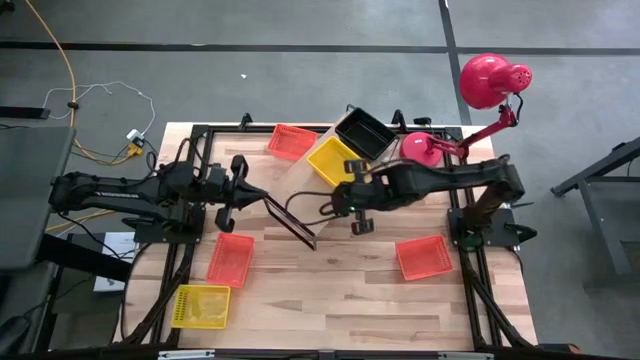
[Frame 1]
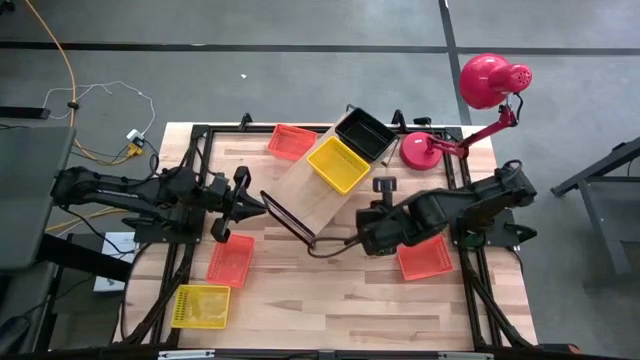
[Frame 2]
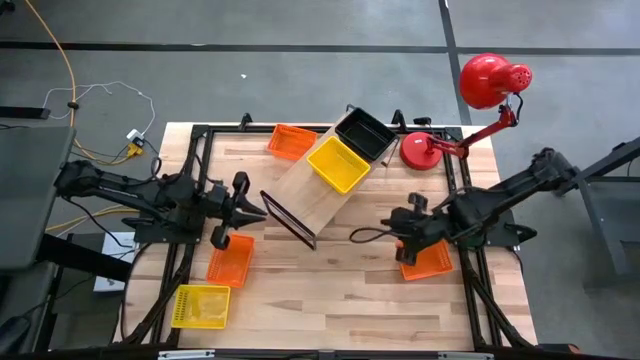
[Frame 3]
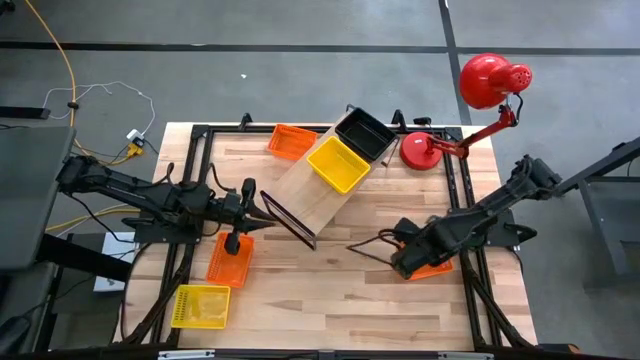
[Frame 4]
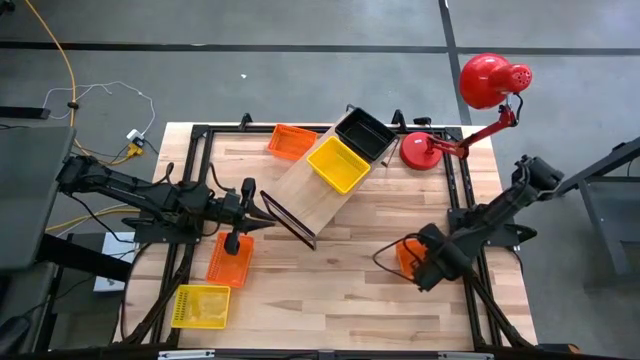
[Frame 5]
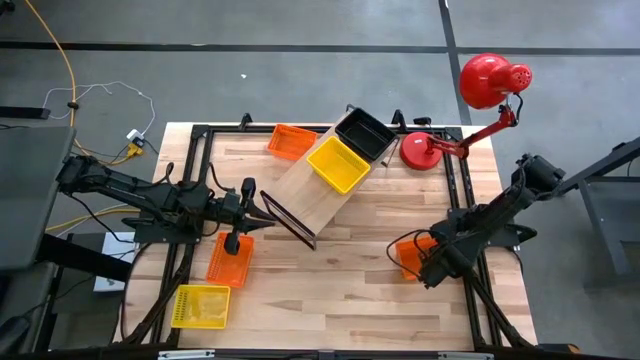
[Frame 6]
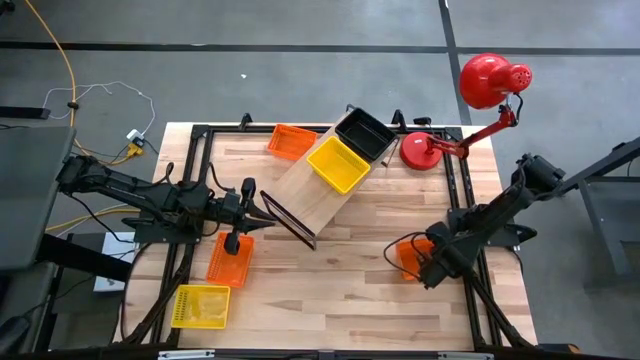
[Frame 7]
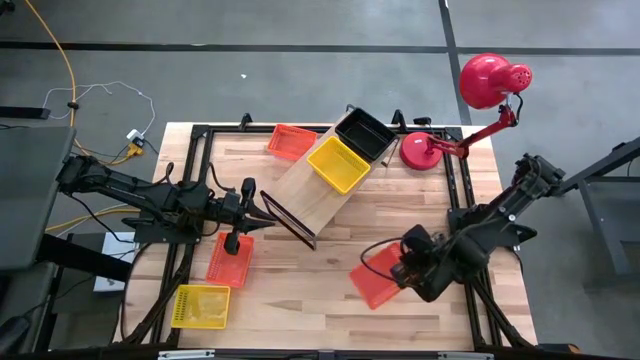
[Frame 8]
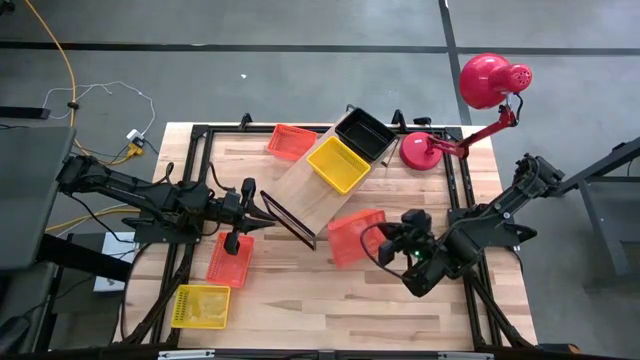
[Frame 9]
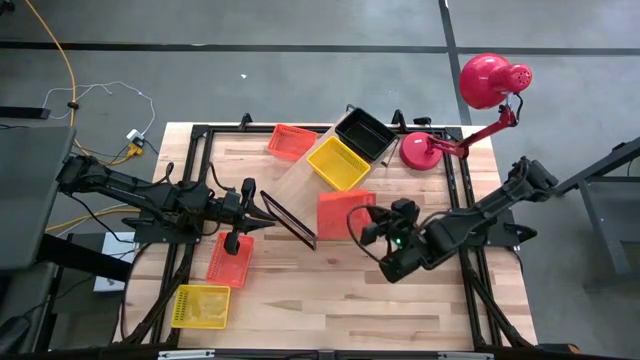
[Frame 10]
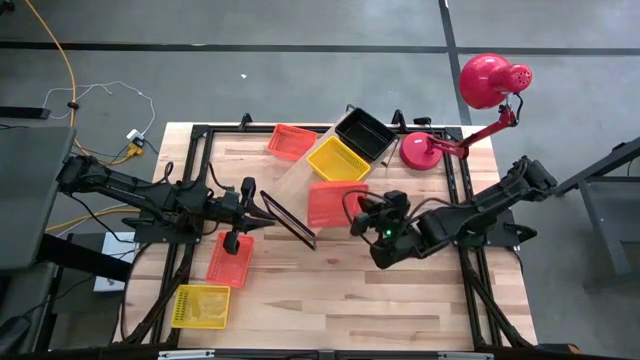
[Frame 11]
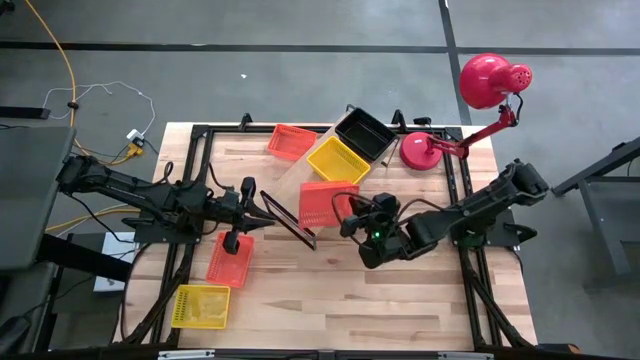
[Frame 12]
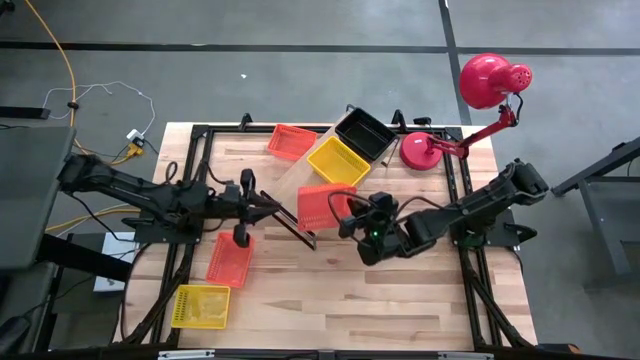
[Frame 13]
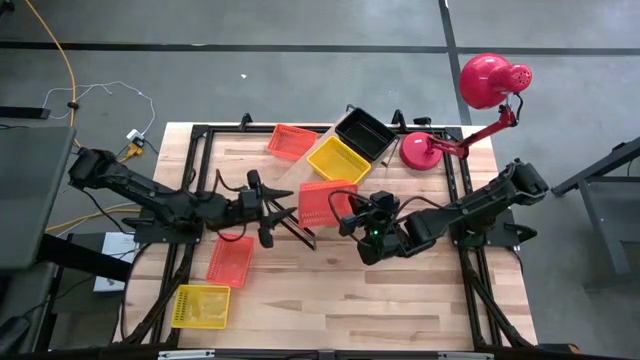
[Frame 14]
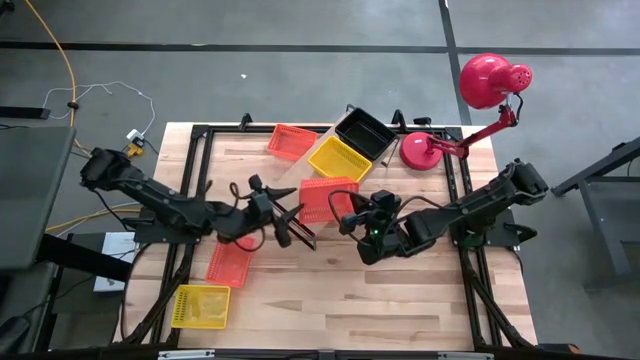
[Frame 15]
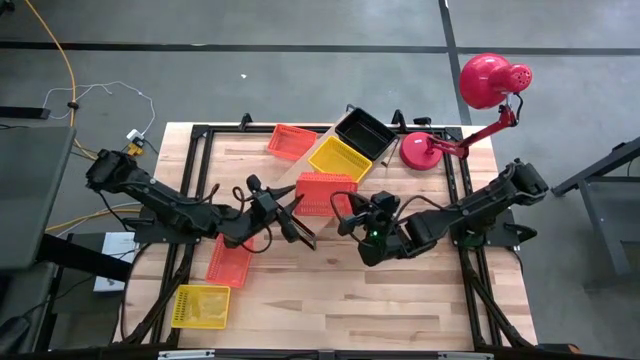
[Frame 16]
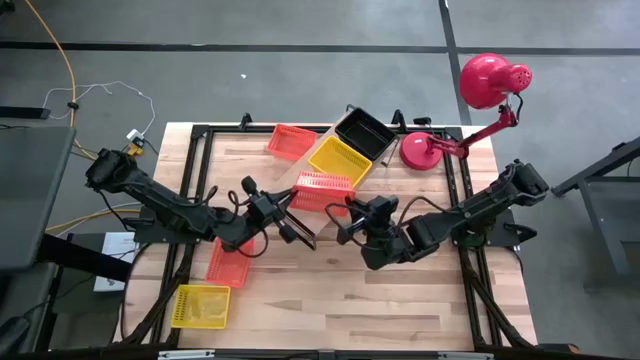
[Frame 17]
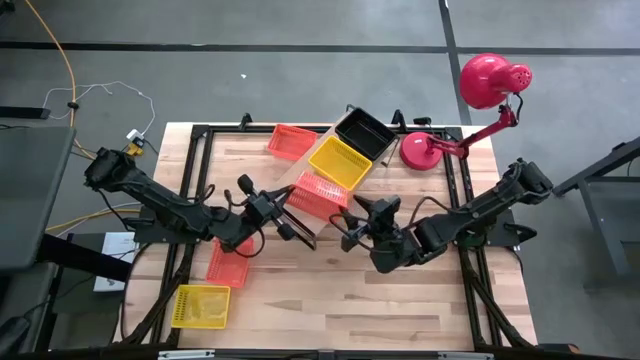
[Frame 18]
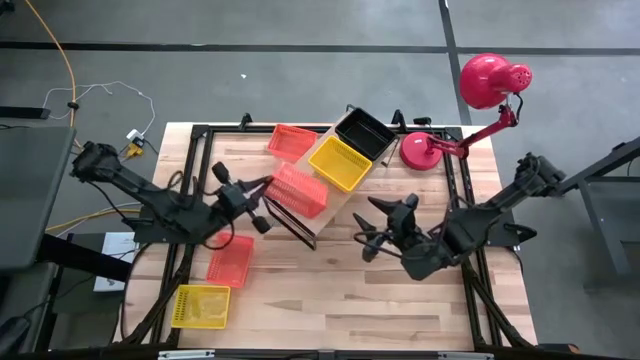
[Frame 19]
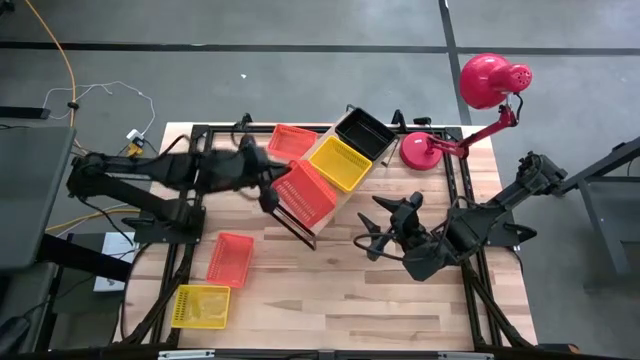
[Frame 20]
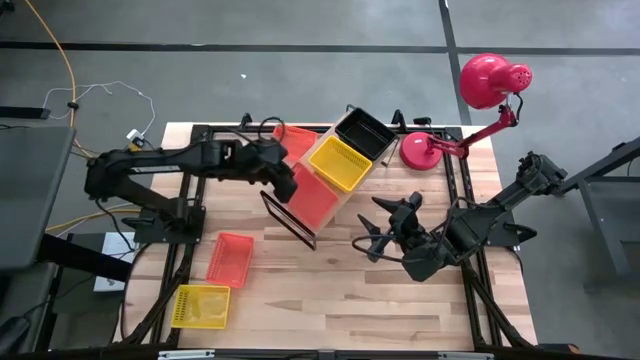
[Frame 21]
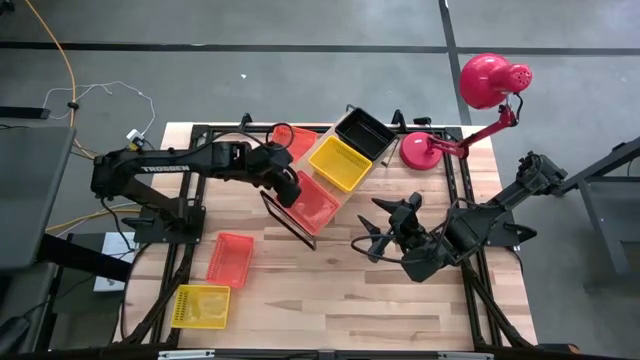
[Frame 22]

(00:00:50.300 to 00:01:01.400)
Task: Stack baskets on shelf by color
Put the bottom right orange basket on the shelf

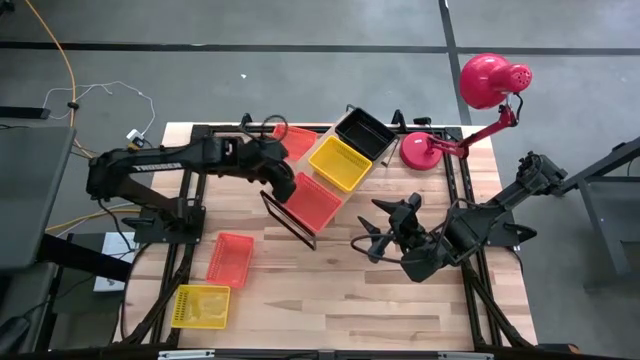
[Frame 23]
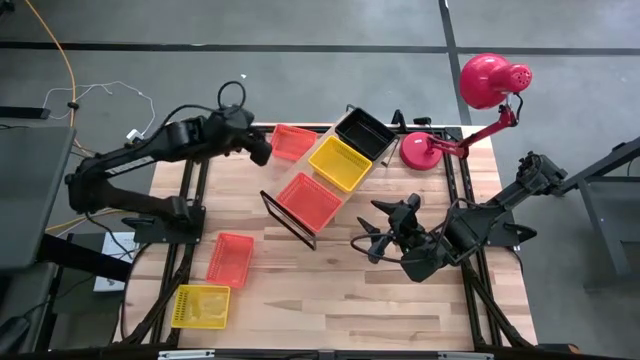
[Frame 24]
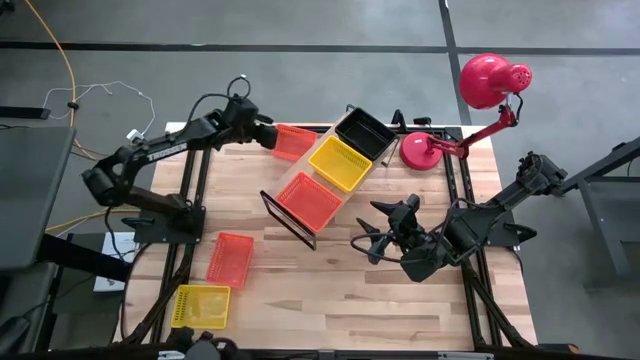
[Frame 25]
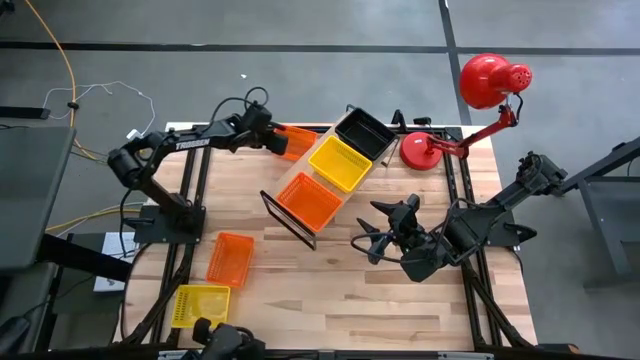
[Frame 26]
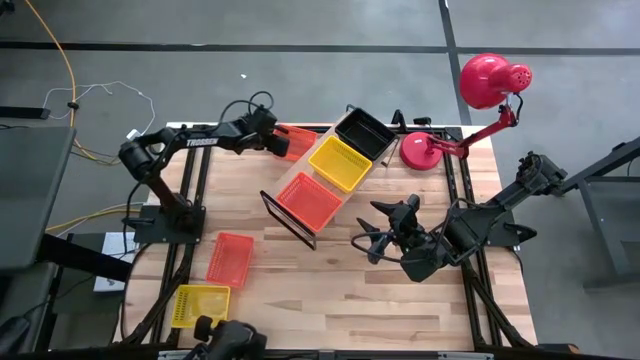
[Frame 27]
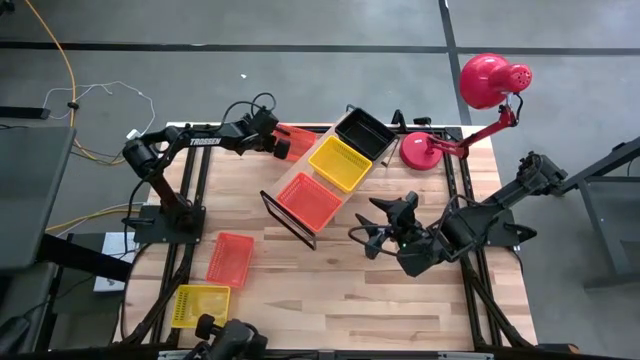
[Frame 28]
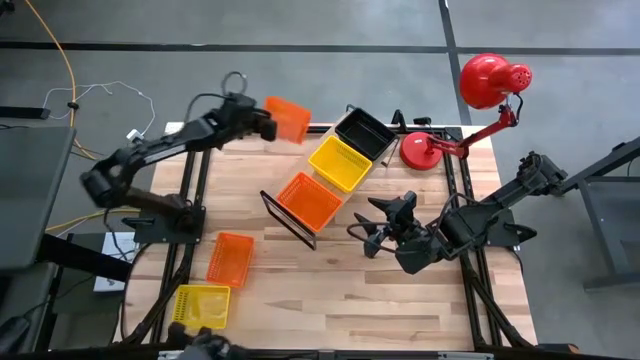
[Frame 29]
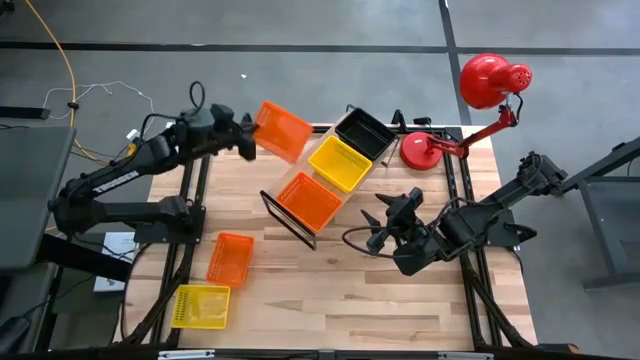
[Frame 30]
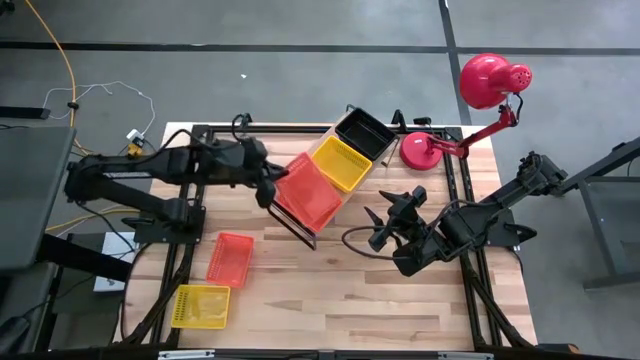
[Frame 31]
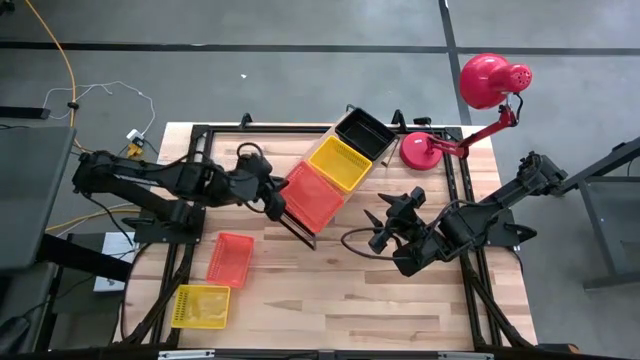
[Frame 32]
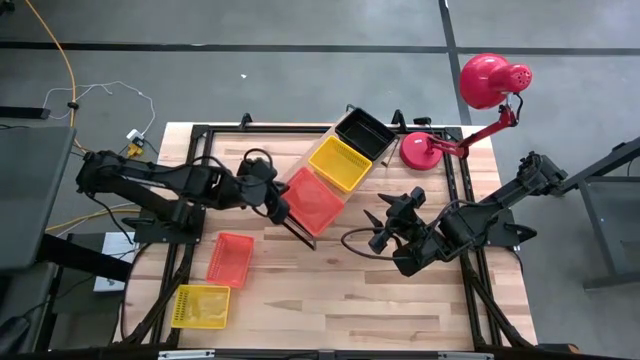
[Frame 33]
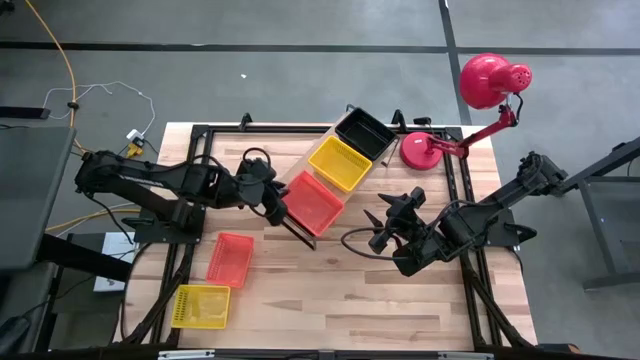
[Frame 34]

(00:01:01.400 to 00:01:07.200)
Stack the top orange basket on top of the orange basket on the shelf

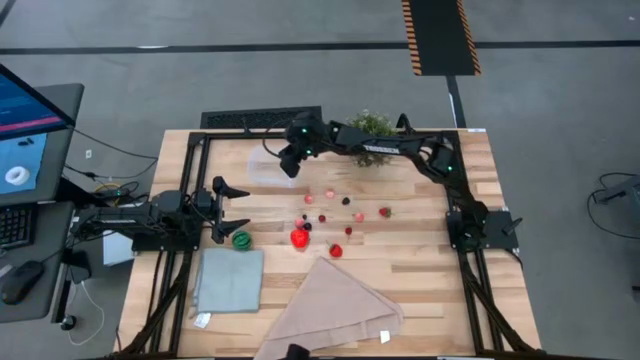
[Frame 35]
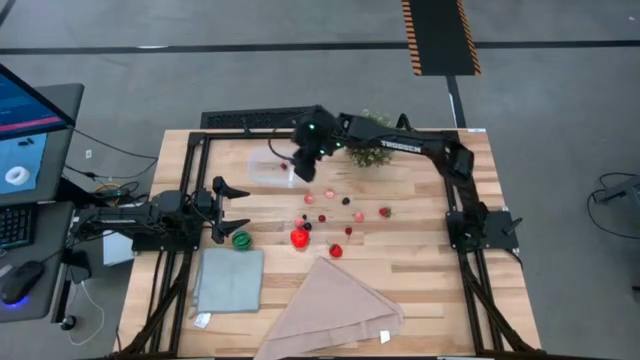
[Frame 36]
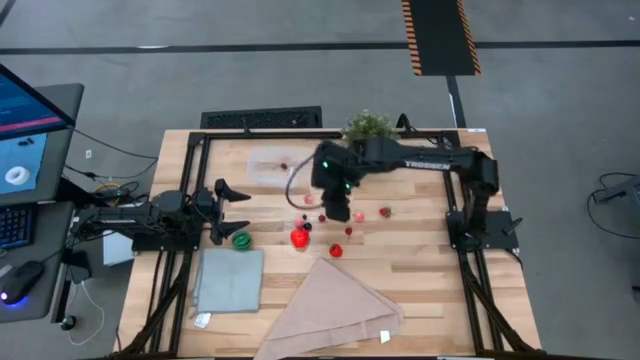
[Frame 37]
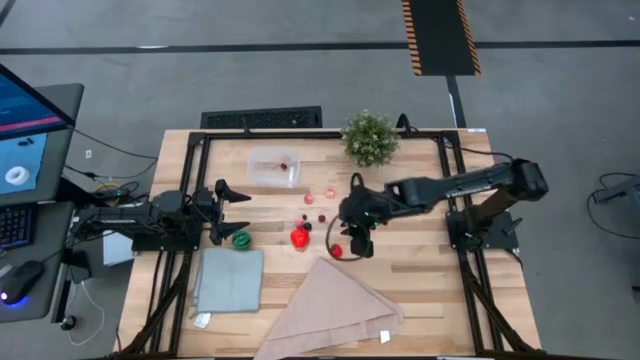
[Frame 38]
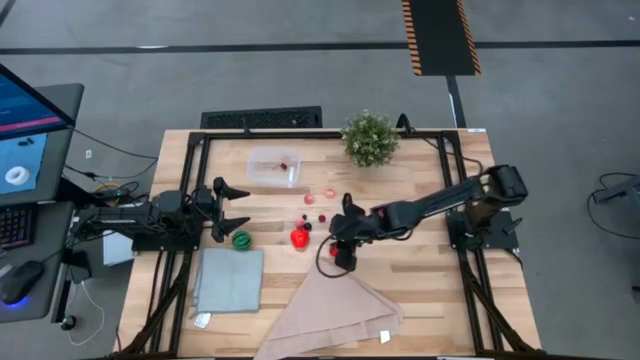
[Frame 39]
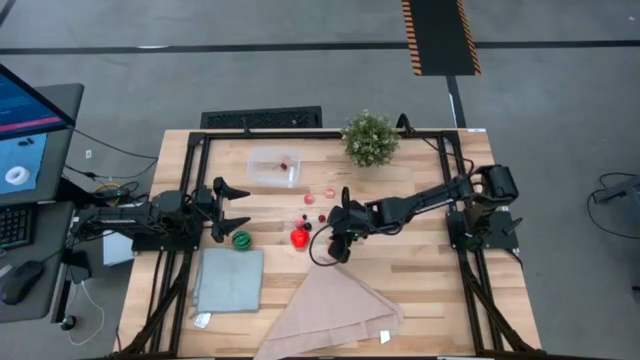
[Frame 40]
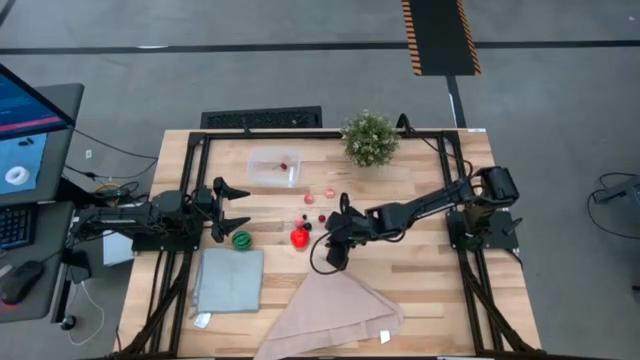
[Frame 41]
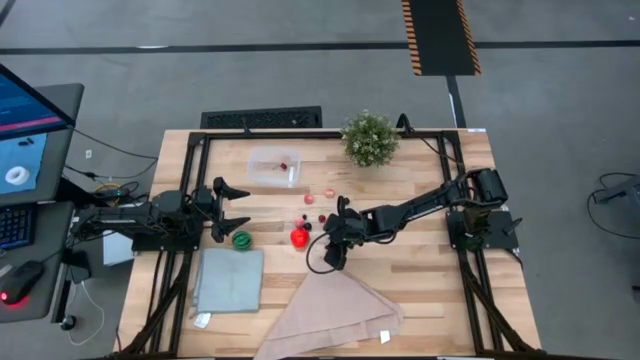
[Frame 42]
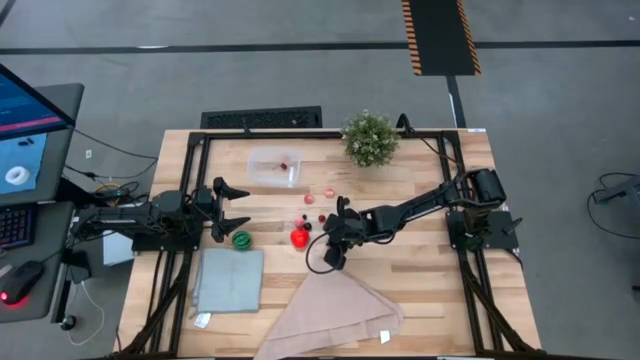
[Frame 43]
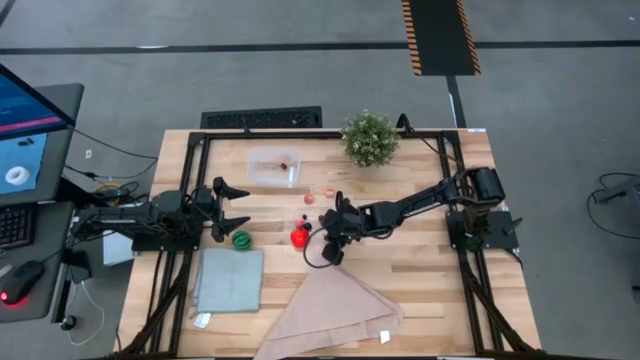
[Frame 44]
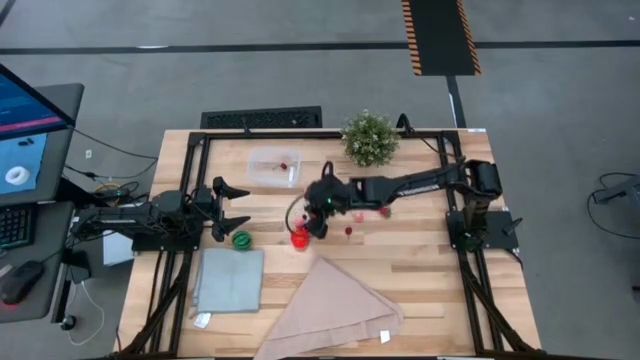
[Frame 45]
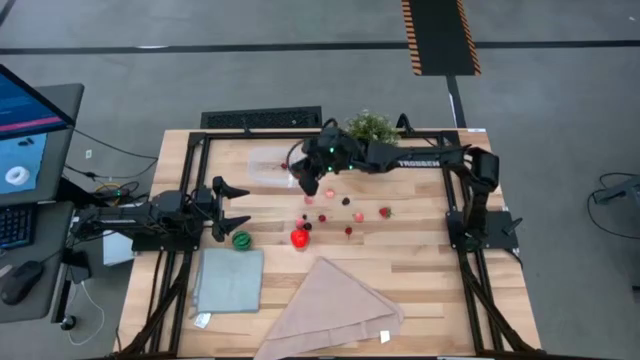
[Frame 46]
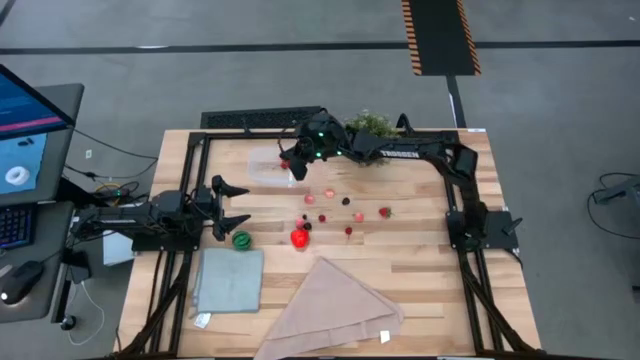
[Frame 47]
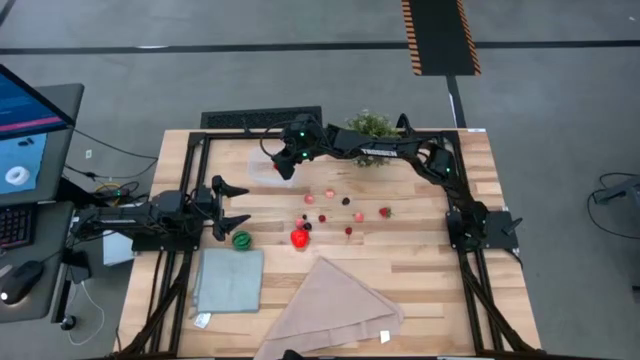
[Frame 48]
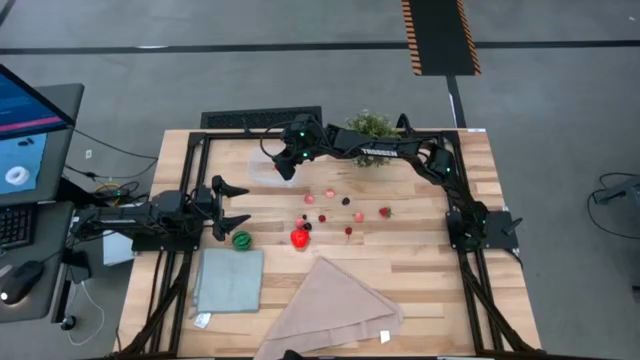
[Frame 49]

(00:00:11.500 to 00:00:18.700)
Task: Pick and placing Produce into tupperware
Put the red strawberry into the transparent container
